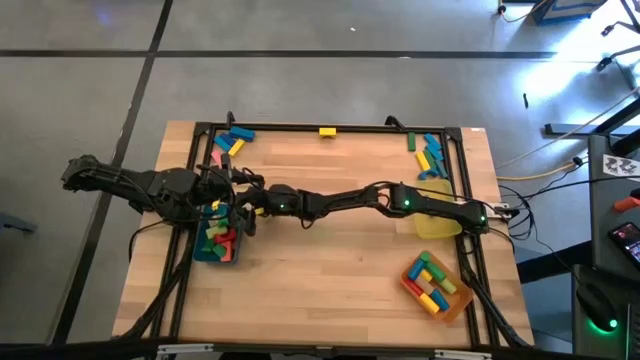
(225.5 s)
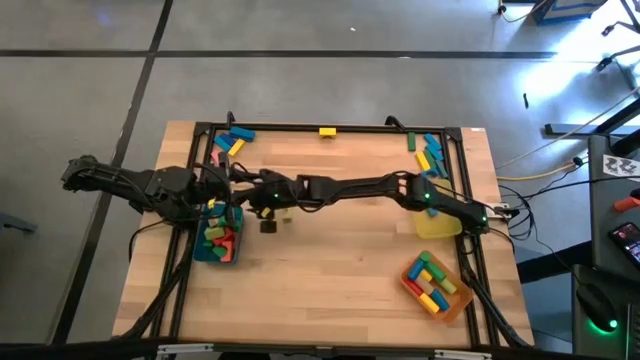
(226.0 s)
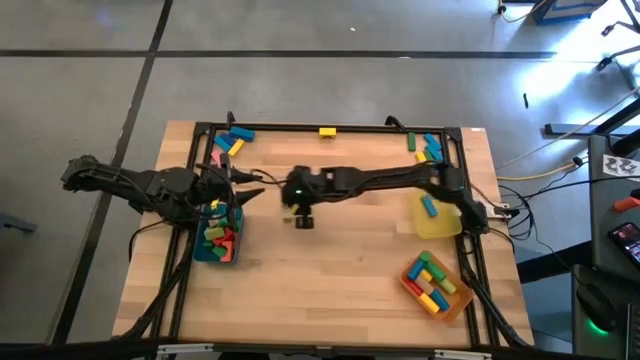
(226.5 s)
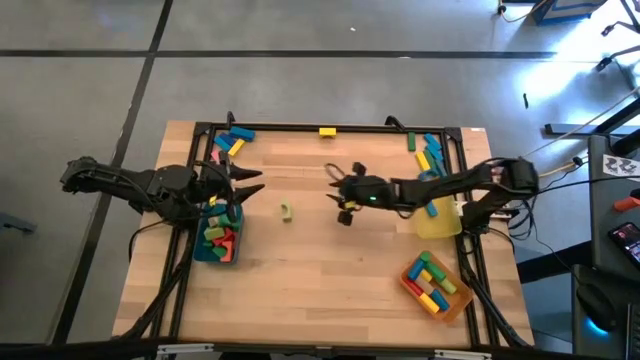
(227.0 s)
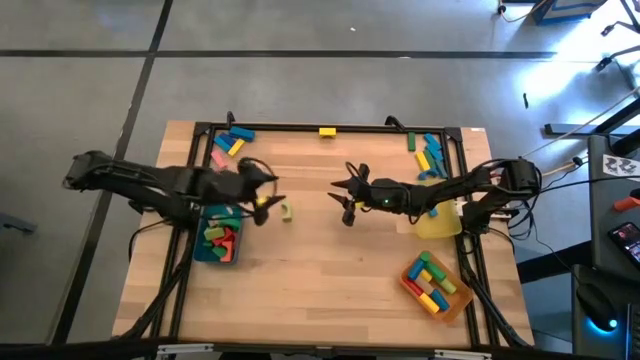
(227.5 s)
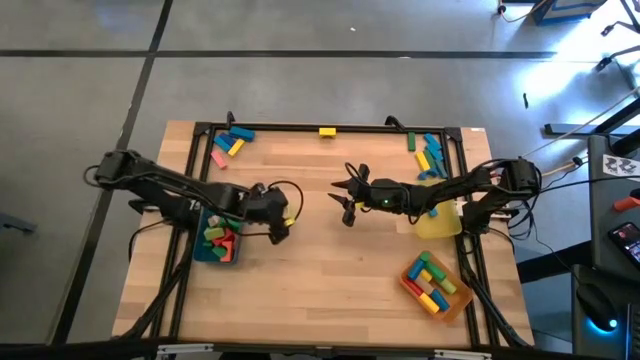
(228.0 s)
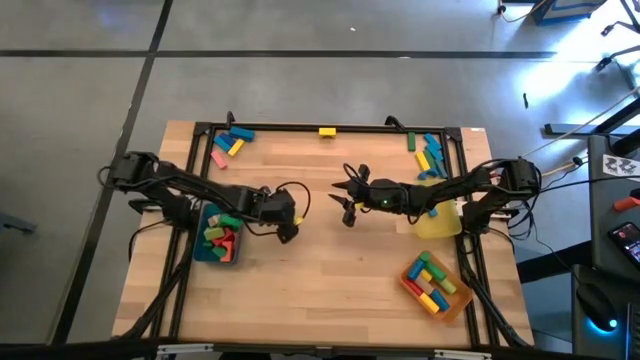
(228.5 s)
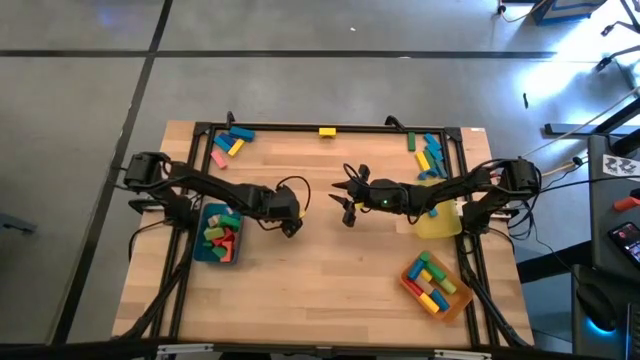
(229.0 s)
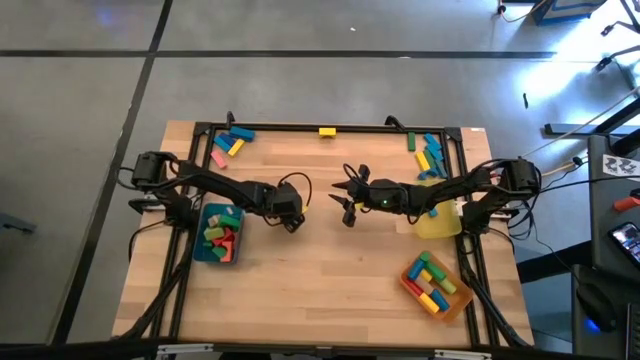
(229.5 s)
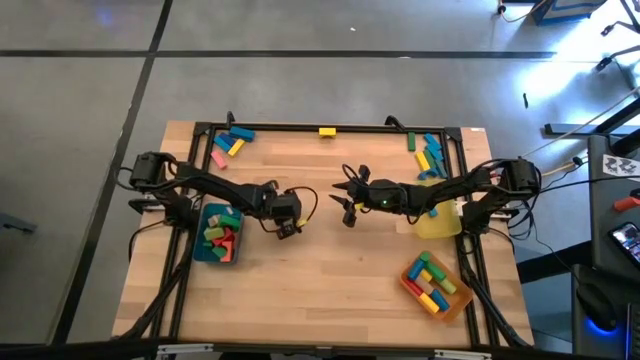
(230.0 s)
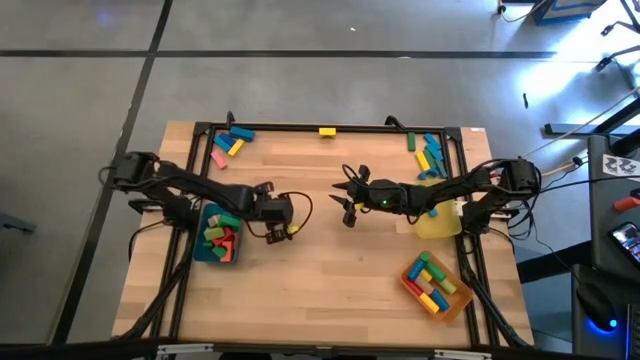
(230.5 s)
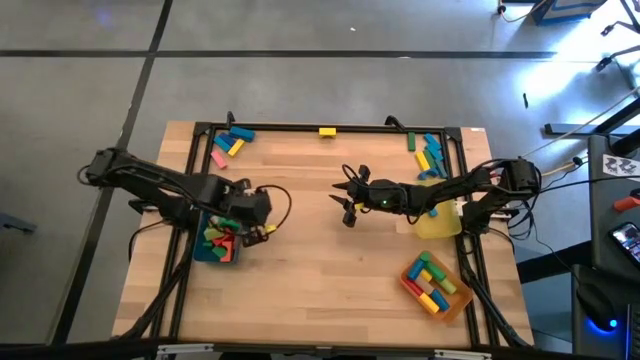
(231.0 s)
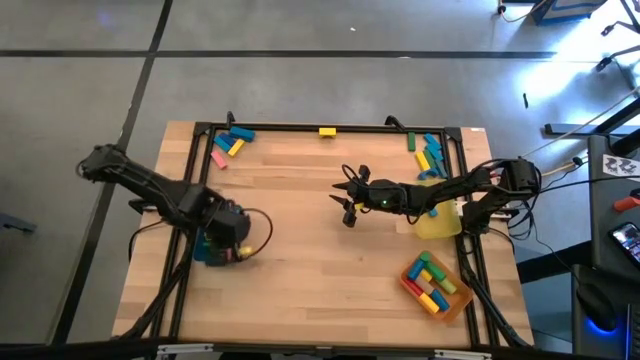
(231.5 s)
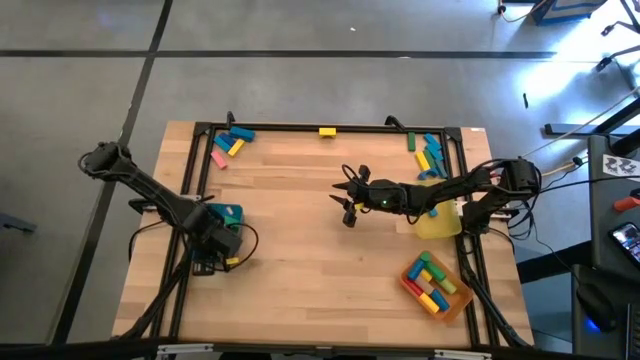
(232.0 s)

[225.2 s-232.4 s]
Task: Sort blocks by size
Put the light green arch block into the blue bin

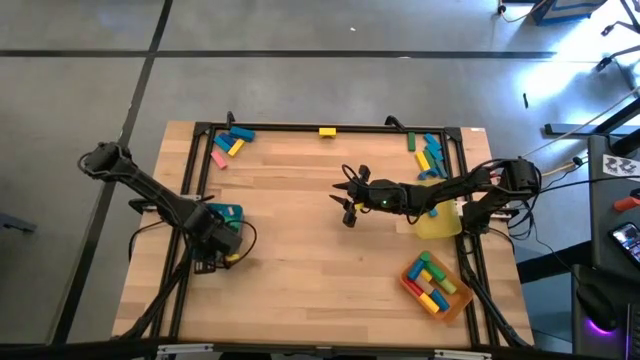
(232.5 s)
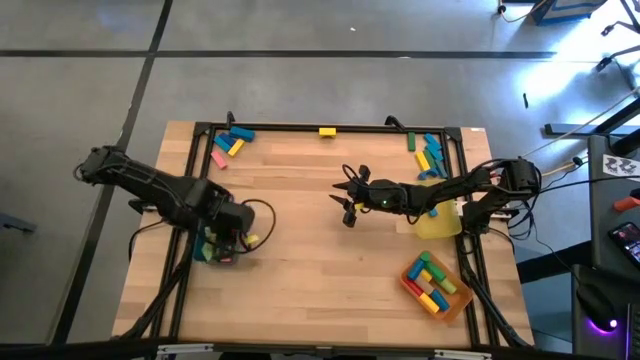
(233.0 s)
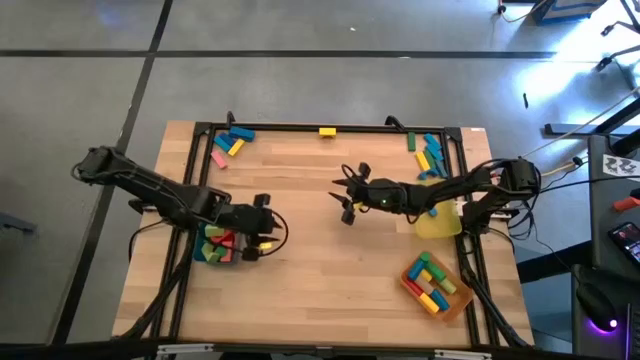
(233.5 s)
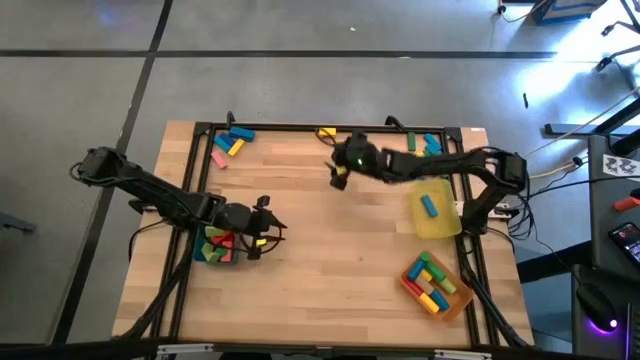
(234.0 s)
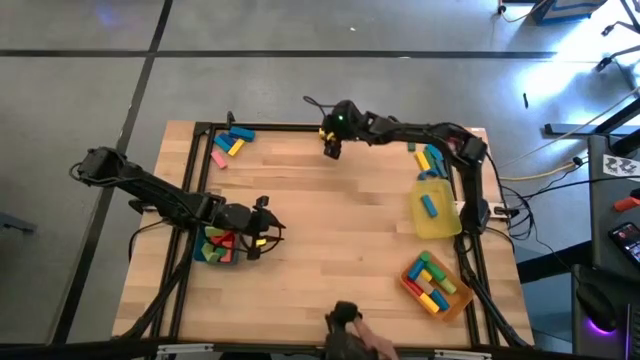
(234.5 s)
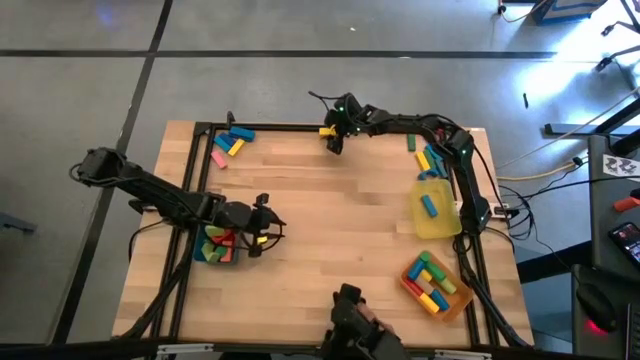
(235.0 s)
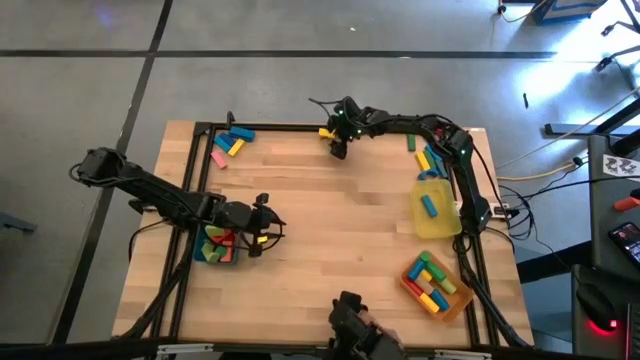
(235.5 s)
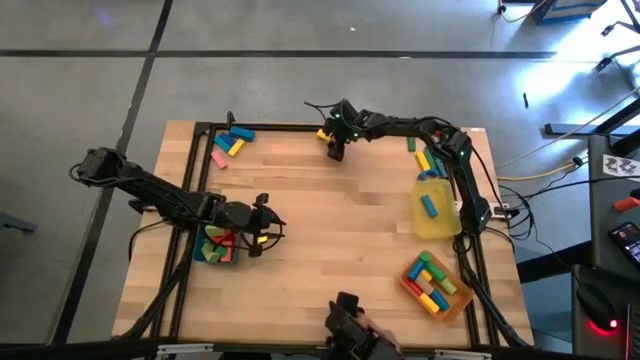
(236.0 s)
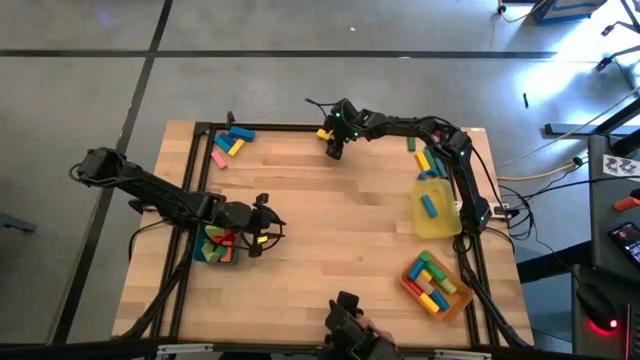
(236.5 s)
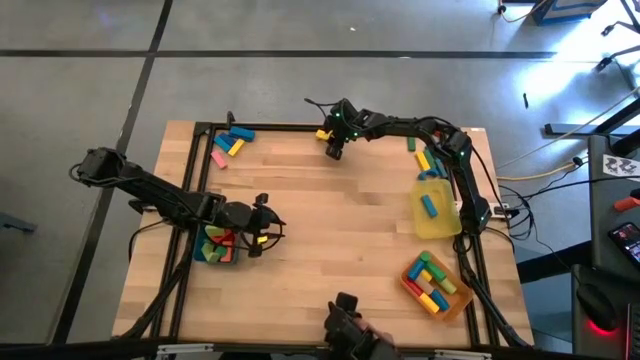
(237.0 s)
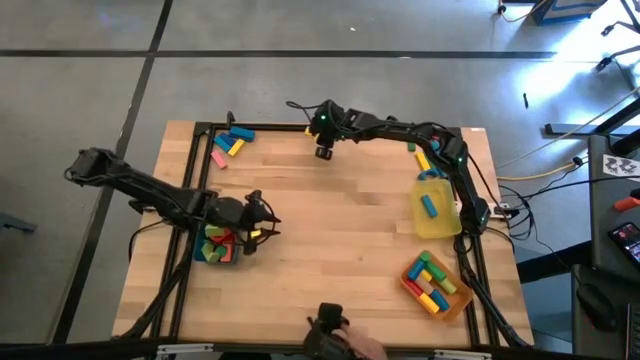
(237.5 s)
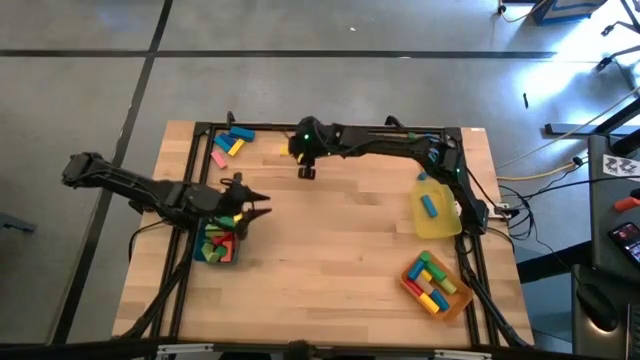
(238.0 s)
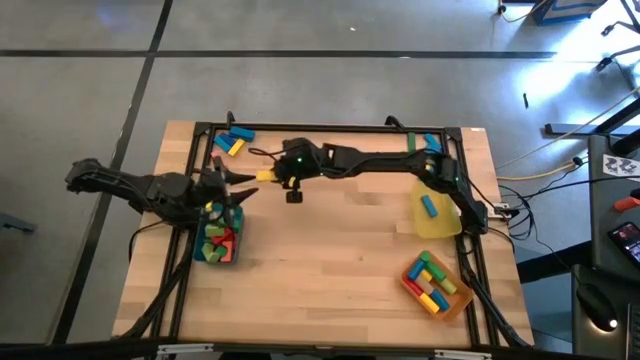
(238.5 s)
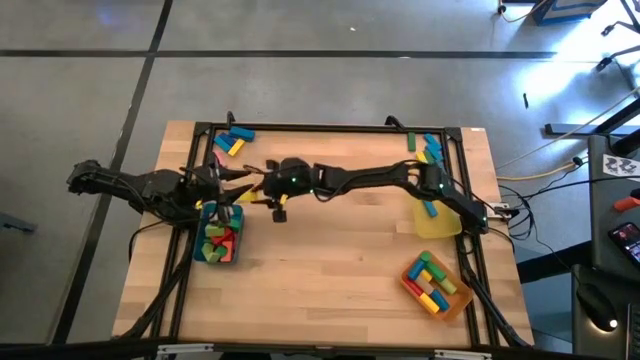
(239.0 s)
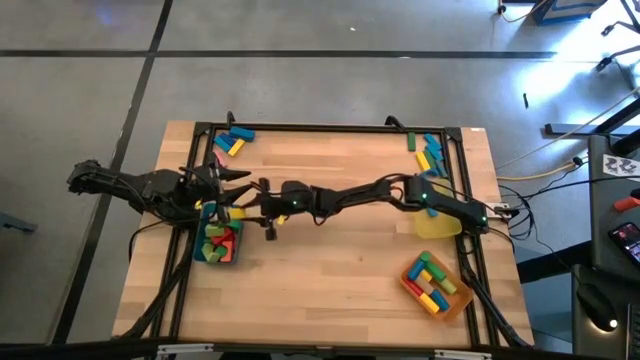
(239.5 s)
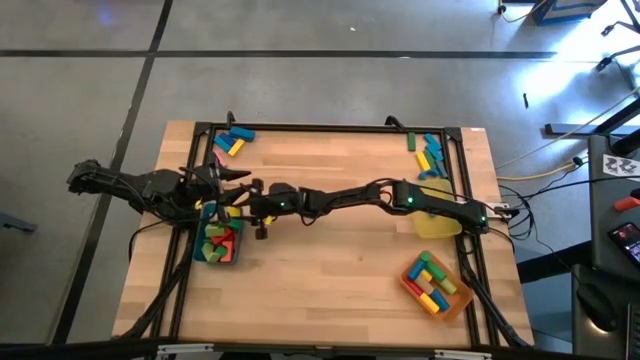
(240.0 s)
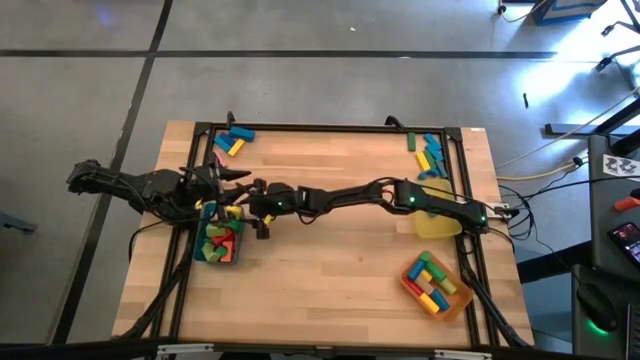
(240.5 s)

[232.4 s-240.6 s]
Put the yellow arch block into the blue bin

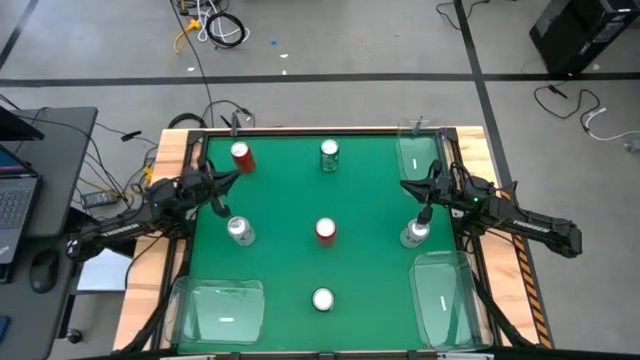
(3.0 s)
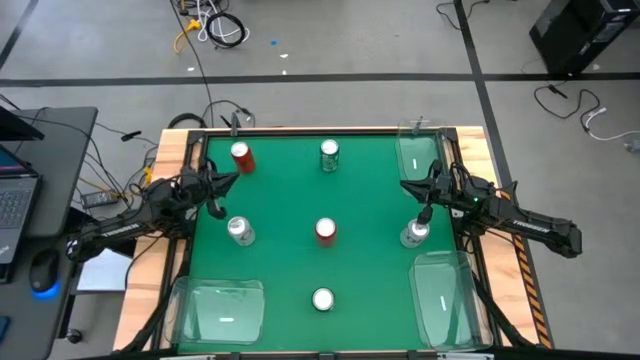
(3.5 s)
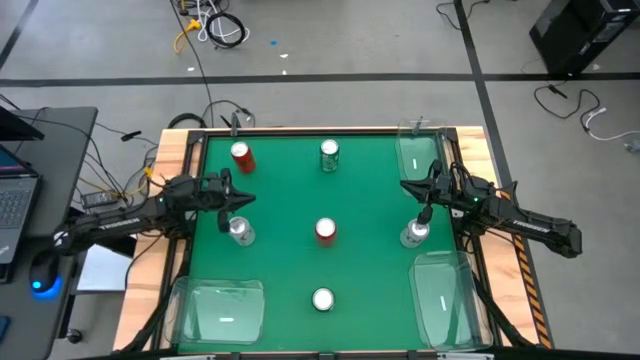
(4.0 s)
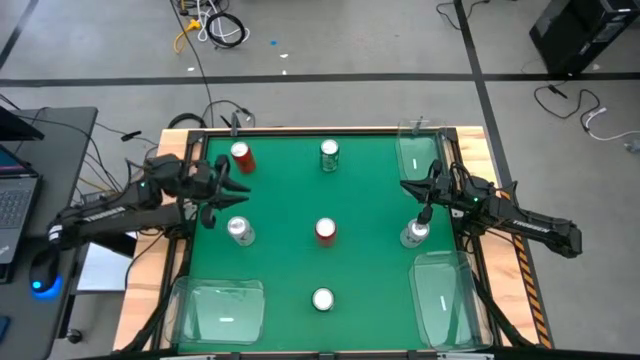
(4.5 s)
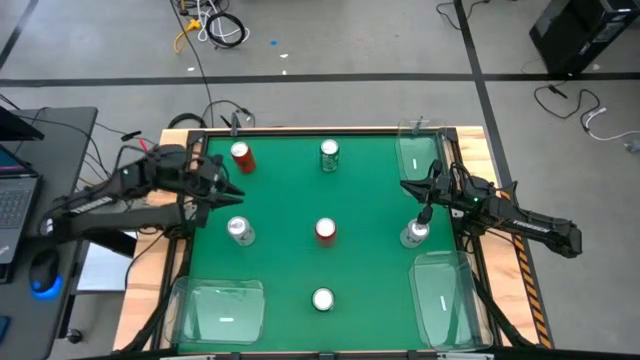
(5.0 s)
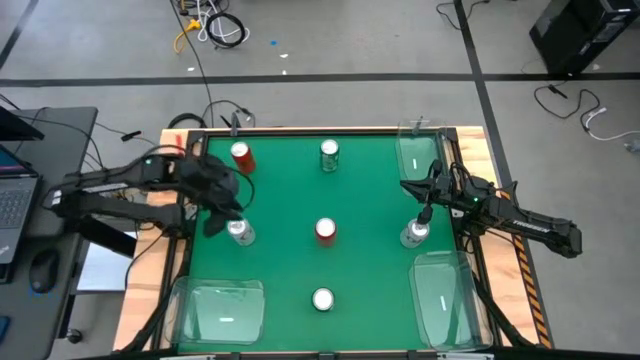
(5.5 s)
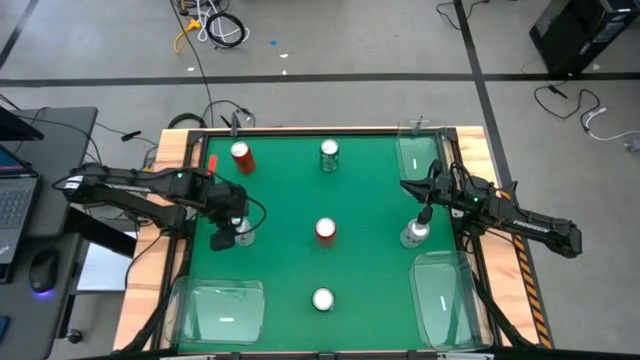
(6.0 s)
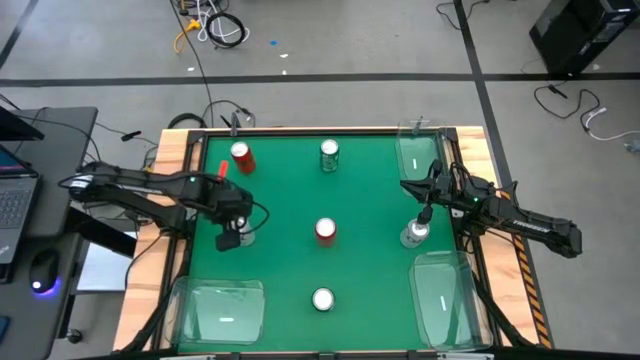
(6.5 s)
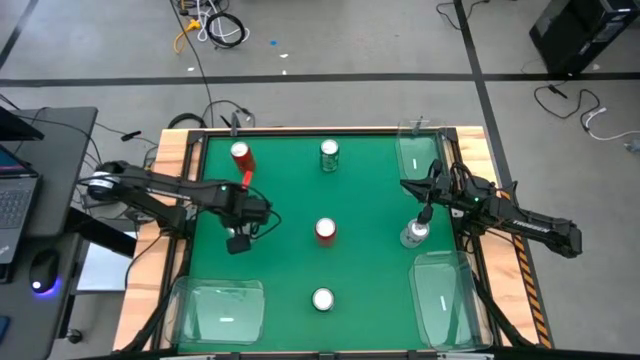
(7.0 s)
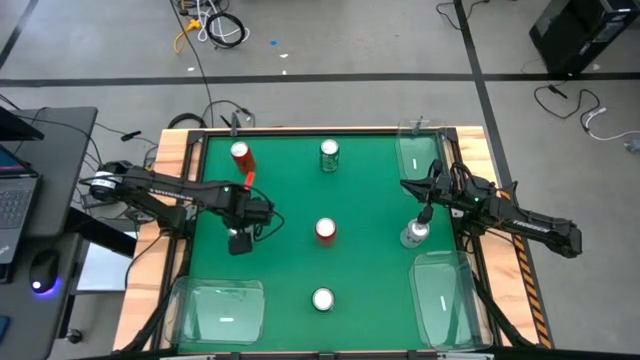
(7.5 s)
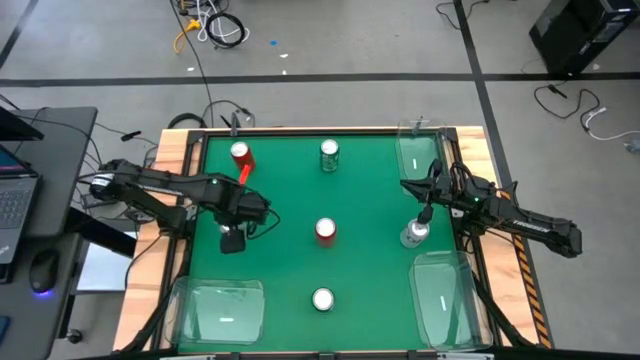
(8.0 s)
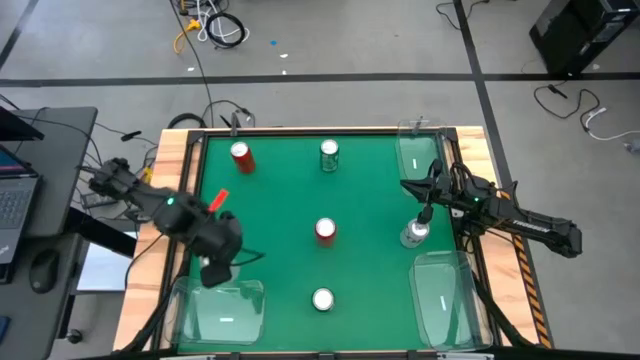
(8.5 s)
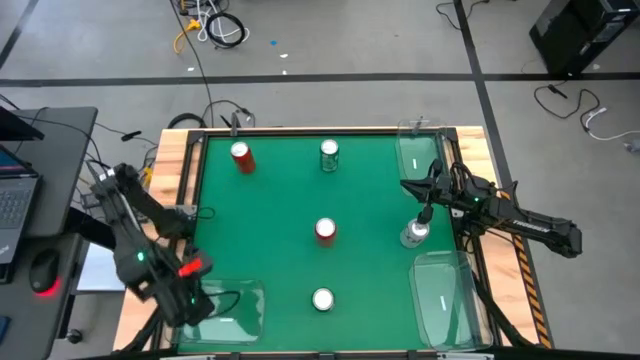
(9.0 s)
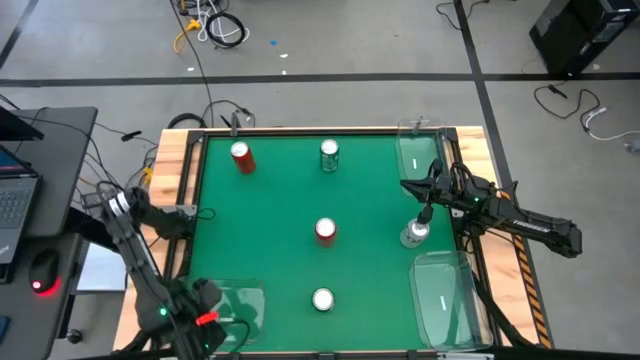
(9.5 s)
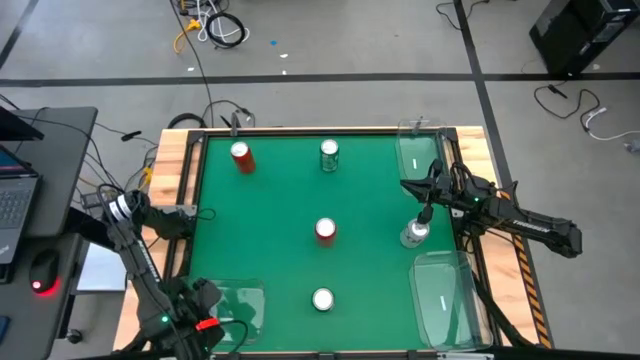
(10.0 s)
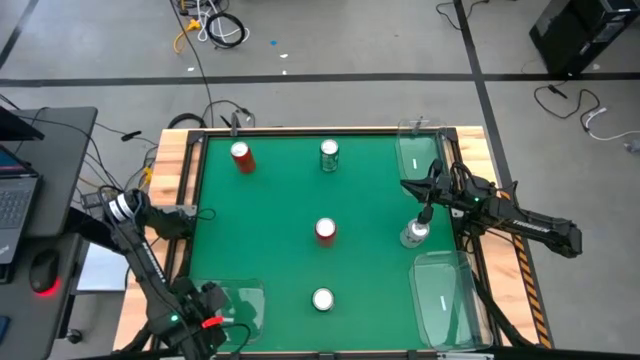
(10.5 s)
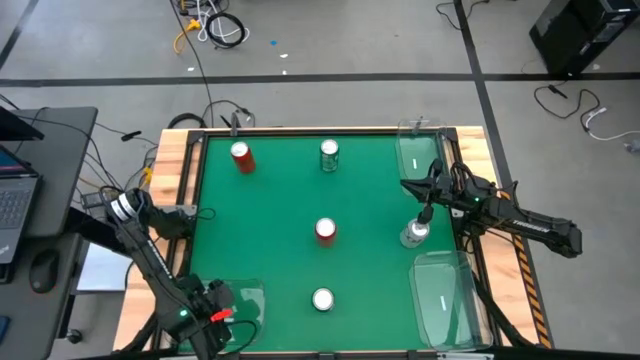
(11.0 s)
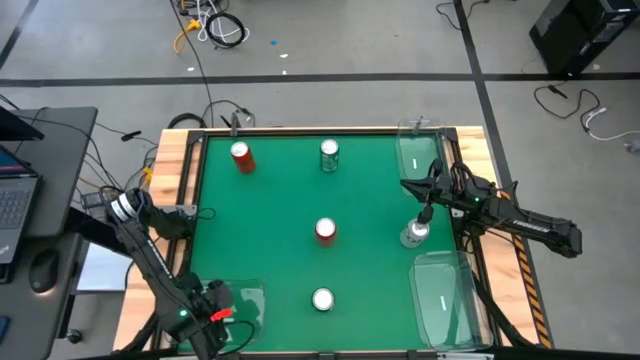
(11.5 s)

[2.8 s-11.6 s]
Task: Sort soda cans
Put the left red-silver soda can into the bottom left transparent bin
